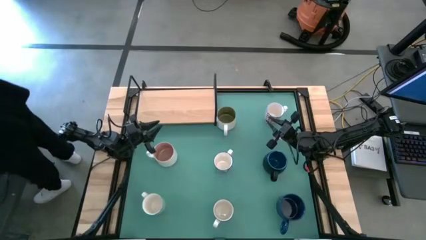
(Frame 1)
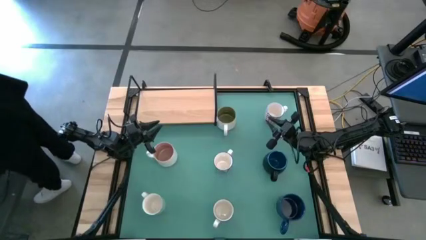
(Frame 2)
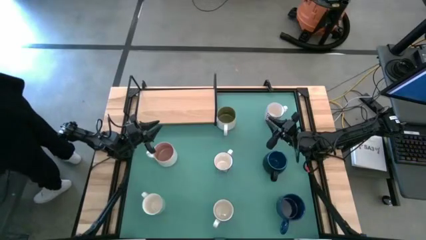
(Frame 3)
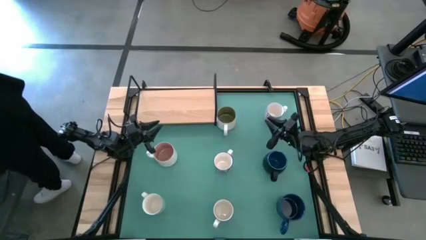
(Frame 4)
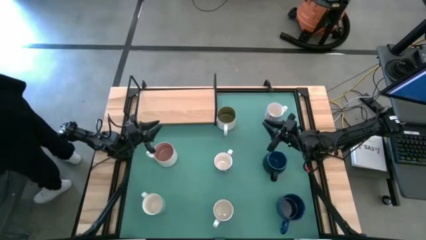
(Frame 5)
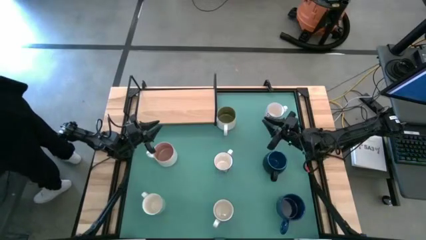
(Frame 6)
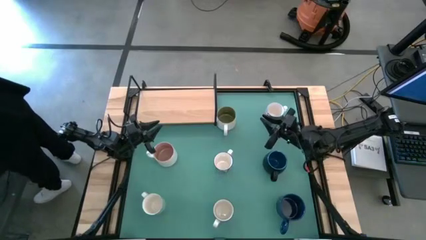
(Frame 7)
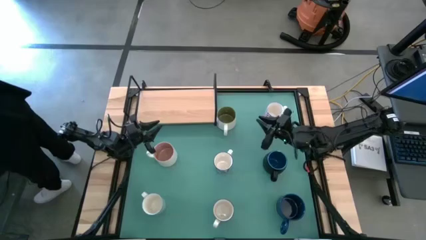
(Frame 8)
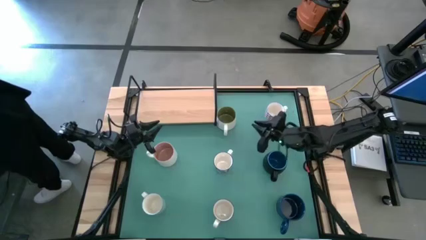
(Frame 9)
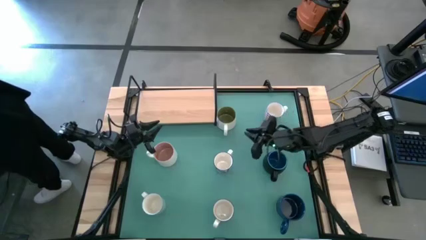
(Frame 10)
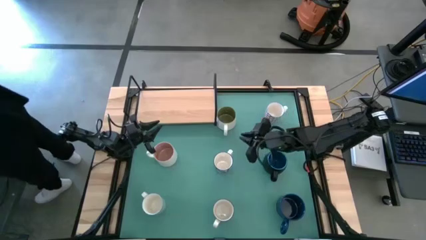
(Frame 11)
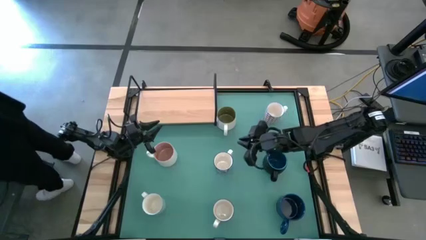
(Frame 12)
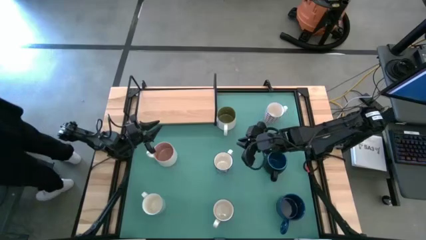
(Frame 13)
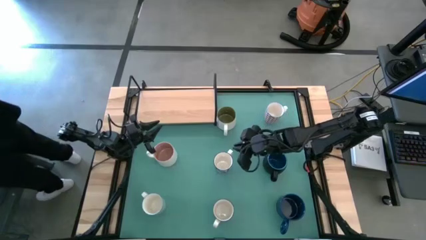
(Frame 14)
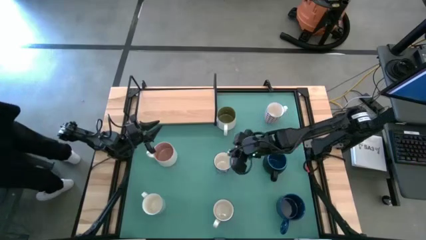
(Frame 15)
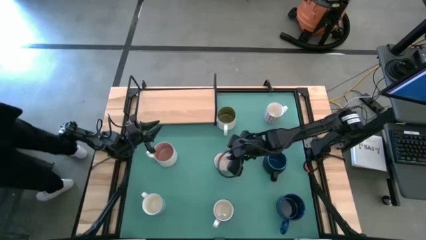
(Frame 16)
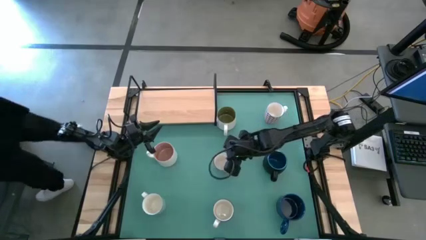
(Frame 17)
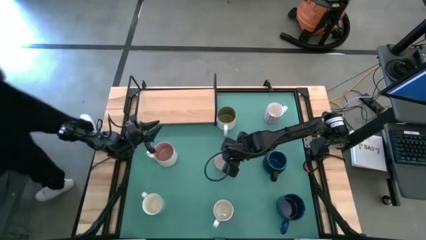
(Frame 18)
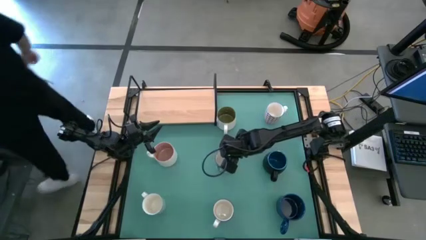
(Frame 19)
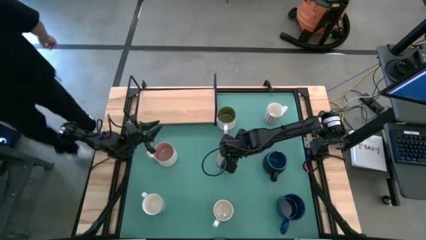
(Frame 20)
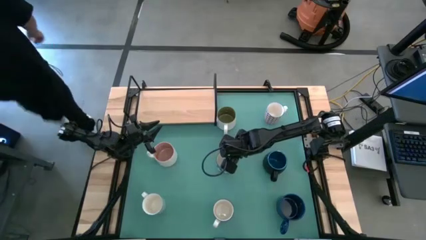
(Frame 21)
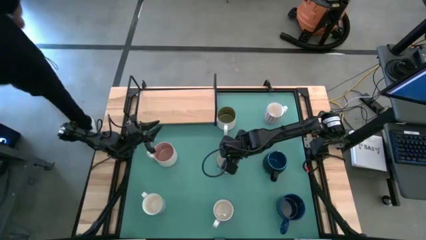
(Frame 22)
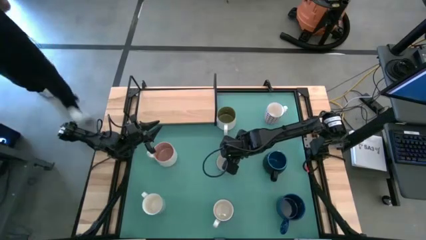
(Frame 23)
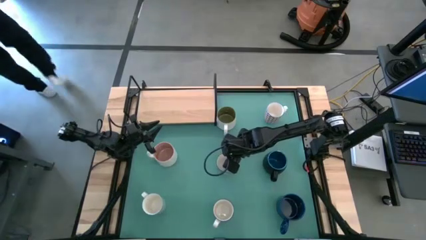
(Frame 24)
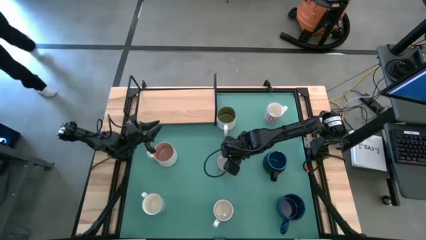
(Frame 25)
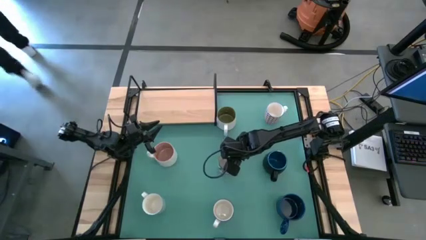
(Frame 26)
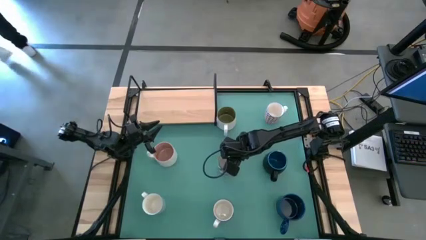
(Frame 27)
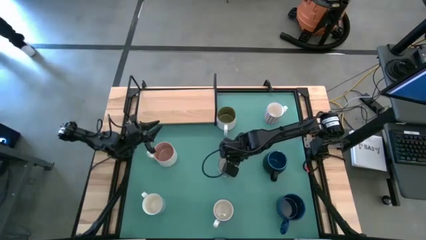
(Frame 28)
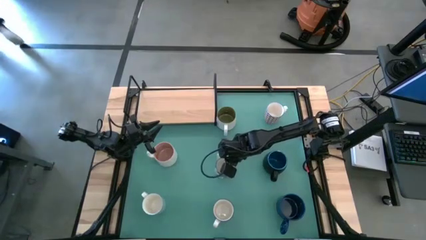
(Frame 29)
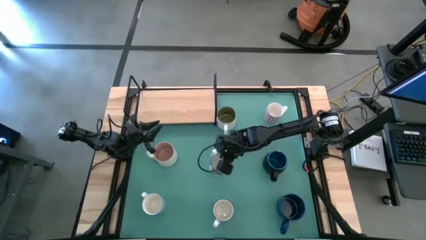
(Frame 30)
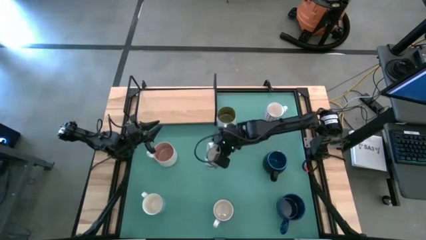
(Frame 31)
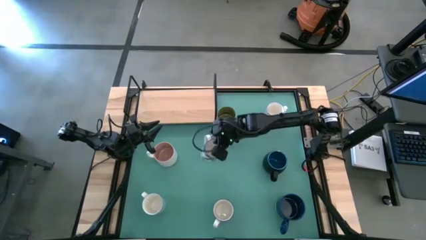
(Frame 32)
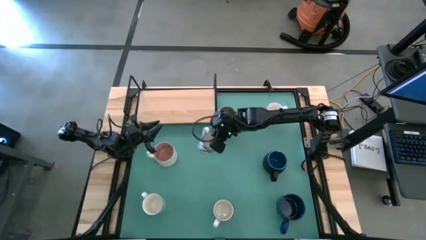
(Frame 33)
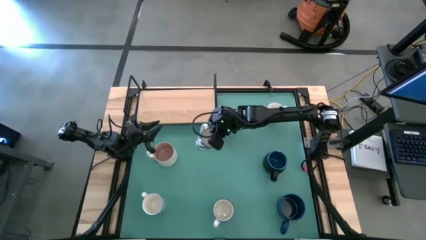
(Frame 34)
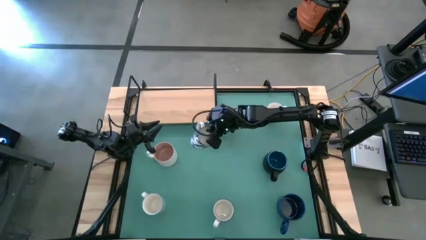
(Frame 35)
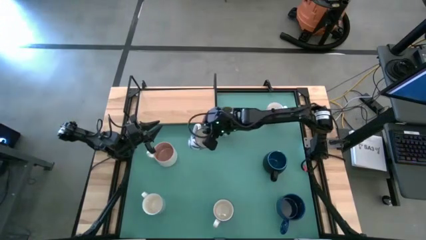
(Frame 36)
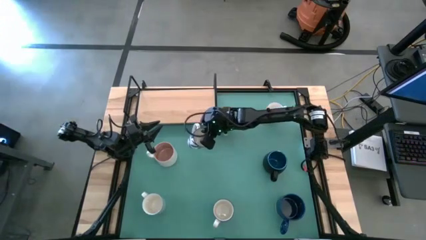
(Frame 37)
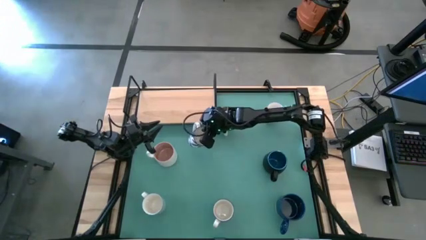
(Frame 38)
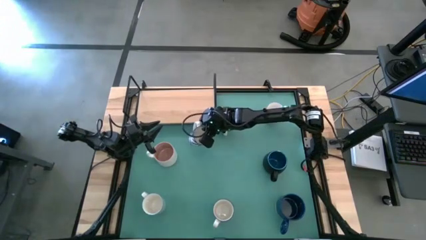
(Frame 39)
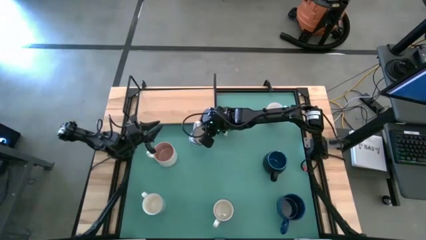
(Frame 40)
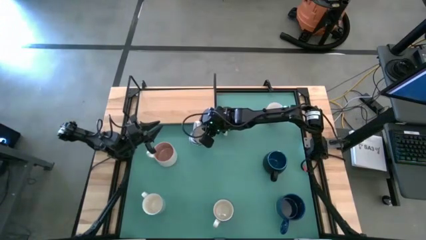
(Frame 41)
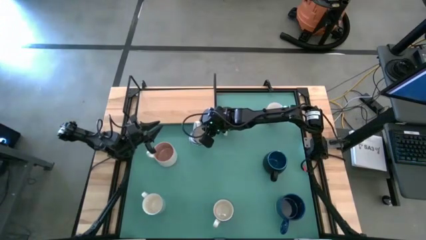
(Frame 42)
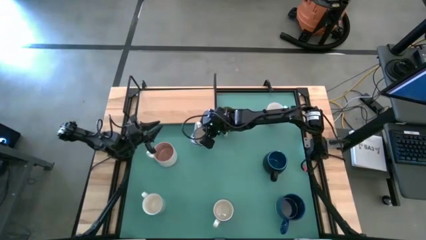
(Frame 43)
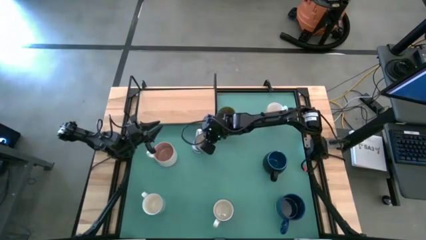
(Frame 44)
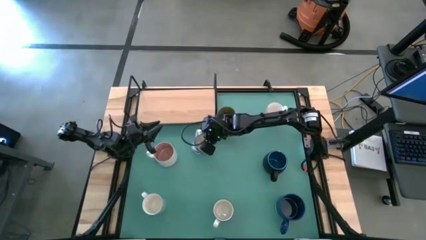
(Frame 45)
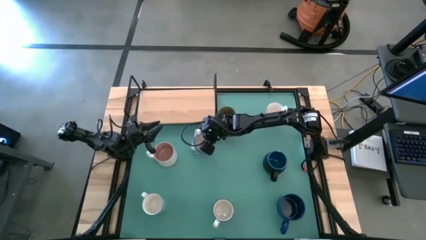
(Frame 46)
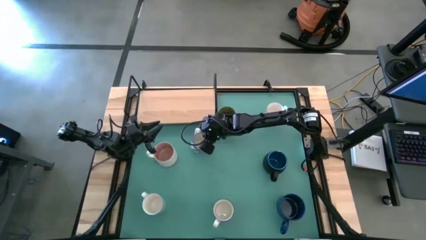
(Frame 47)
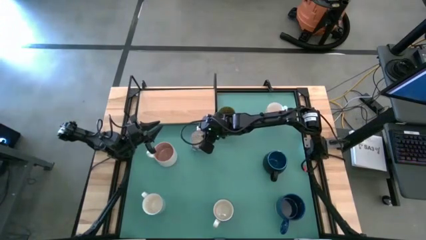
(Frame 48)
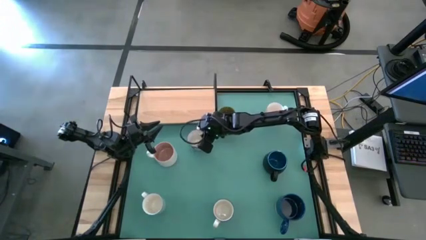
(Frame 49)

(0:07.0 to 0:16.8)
Task: Place coffee mugs
Move the top blue patterned mug to the middle of the table

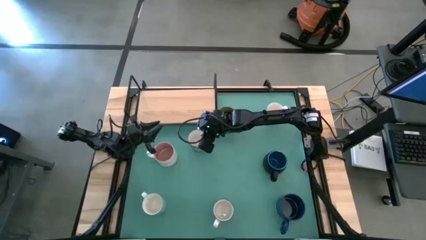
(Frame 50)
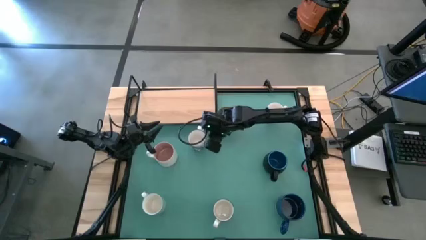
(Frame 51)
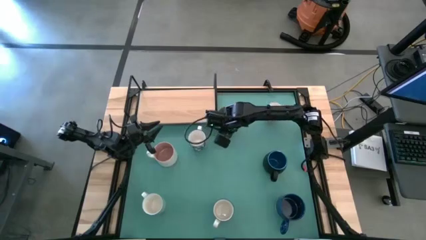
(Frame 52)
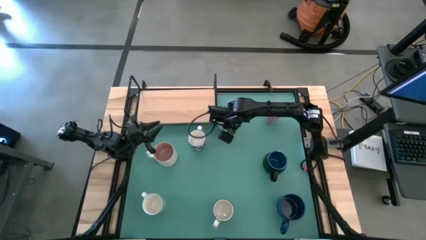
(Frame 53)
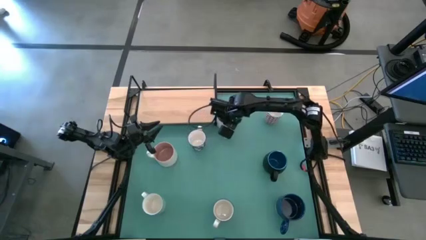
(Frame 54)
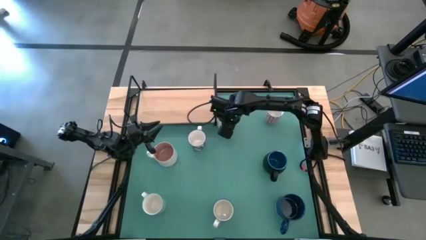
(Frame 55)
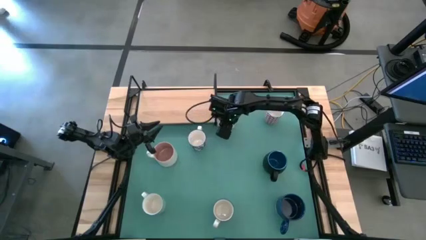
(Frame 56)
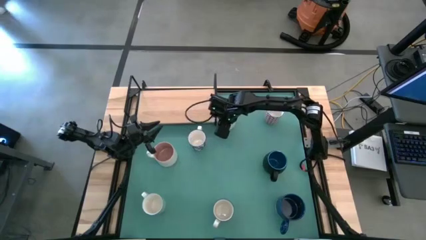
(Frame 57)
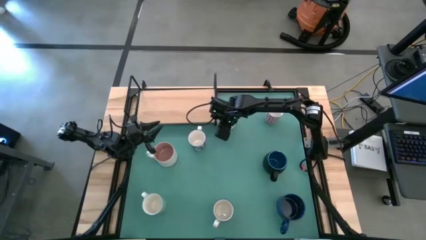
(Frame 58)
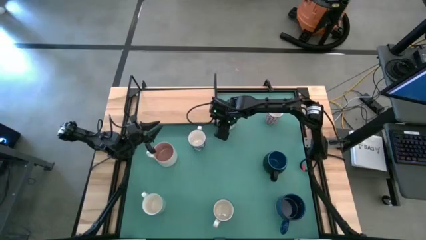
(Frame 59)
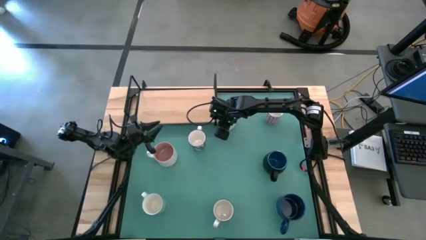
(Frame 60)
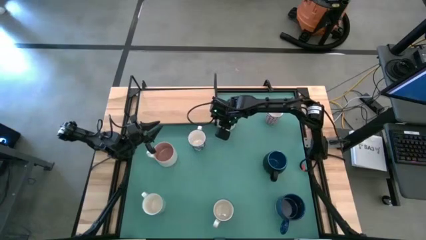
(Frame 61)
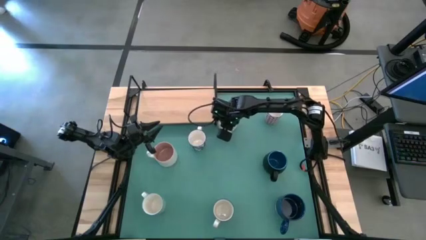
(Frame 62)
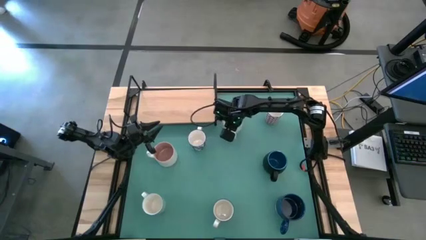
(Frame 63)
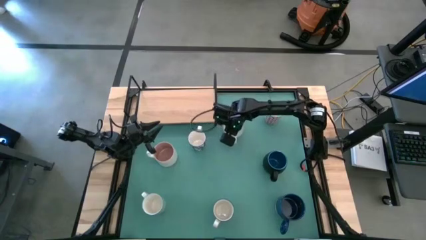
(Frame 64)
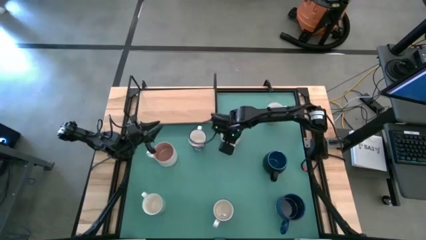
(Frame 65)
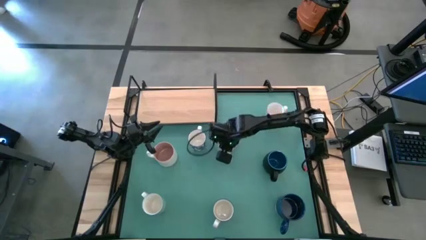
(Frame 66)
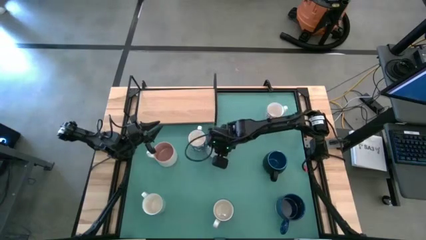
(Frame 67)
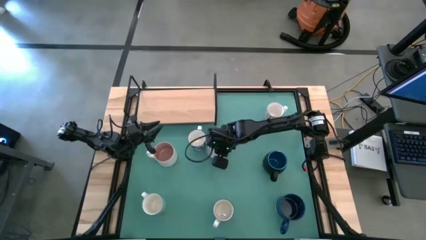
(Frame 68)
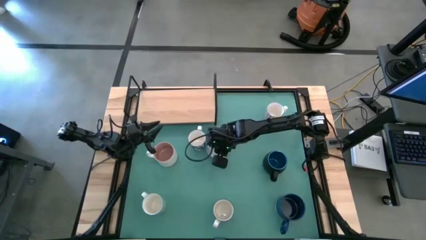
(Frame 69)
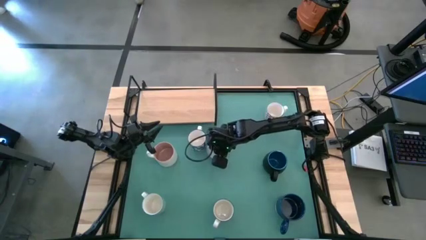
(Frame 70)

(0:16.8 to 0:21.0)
Move the green mug to the middle of the table

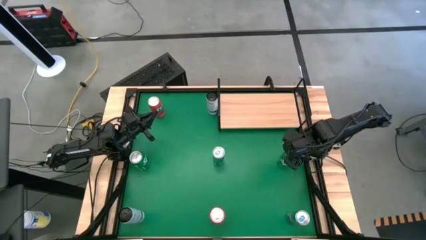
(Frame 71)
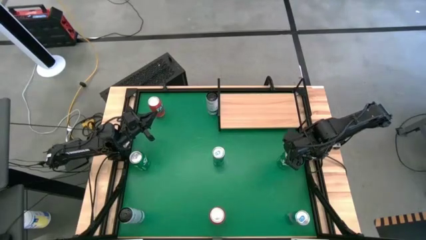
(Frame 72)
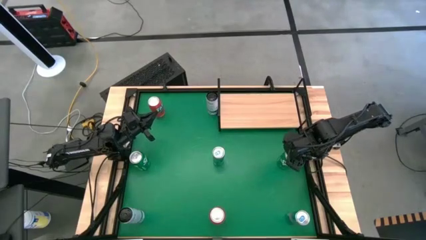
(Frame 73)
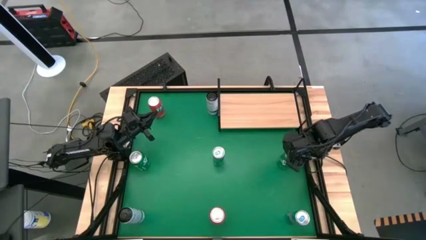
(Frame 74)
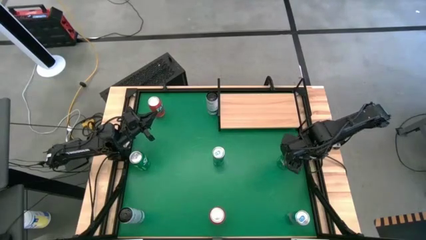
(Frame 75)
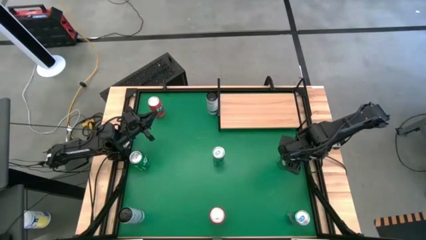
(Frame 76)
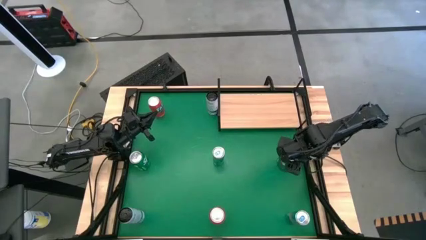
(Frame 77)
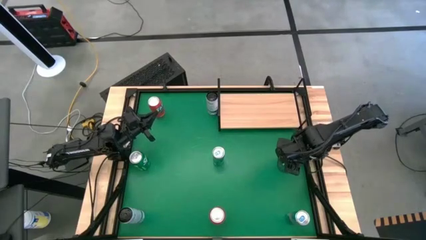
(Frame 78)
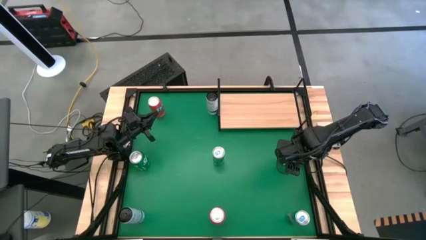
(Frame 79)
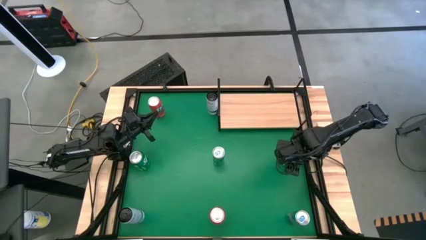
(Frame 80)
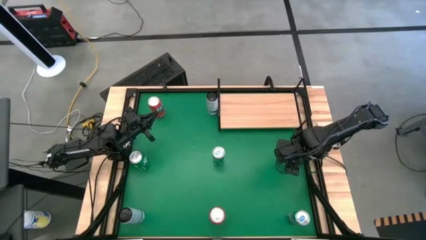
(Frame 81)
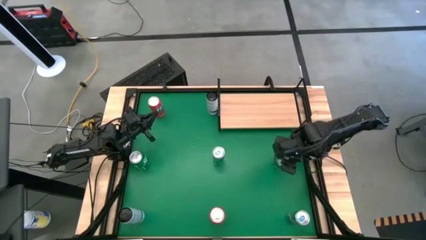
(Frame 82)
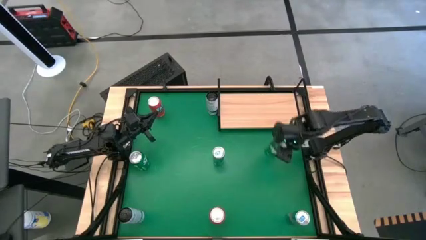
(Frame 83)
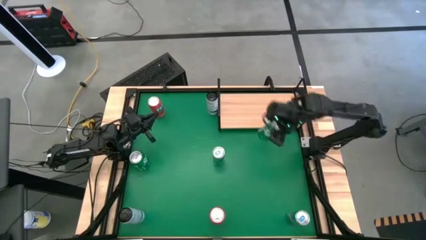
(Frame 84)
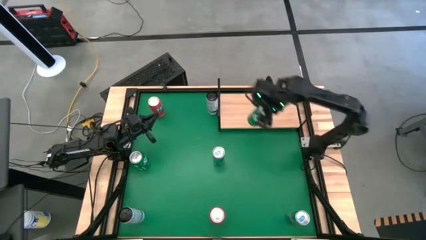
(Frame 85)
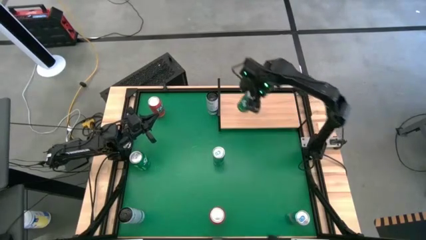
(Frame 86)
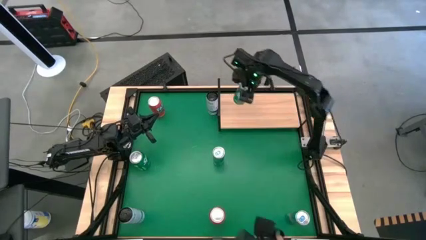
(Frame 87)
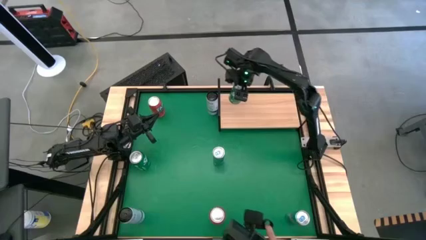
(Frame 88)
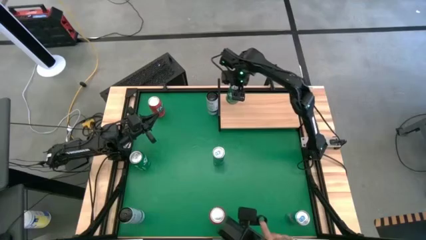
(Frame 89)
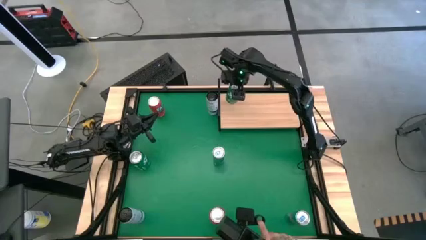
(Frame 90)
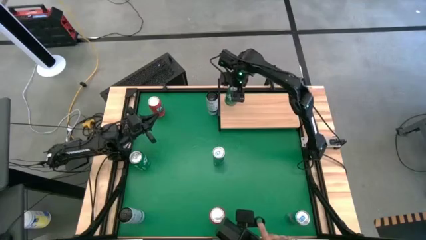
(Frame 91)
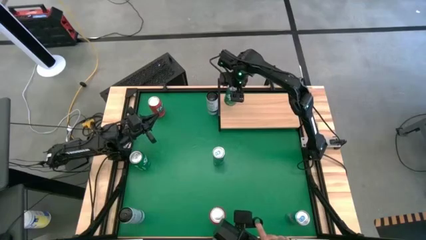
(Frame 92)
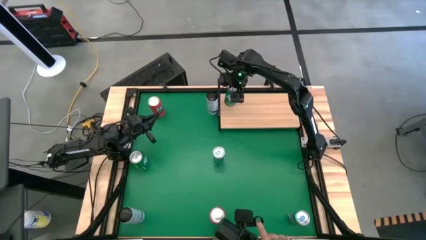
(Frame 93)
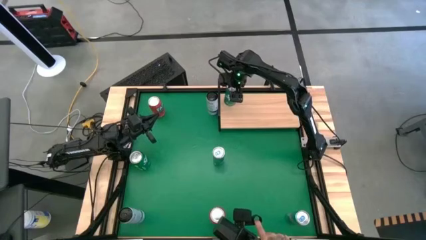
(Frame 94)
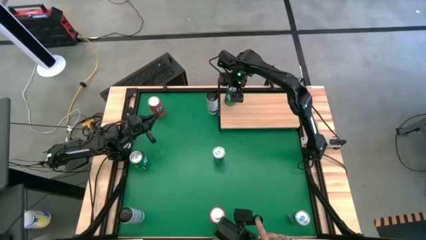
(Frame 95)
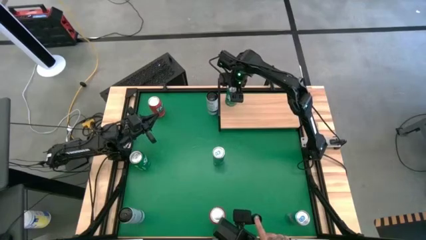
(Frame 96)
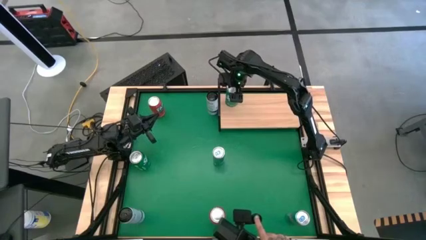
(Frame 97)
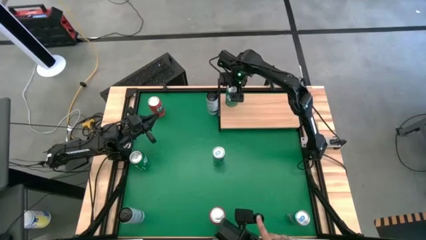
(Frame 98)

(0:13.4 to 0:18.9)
Task: Place canned beverage on shelf
Put the right green soda can on the shelf
